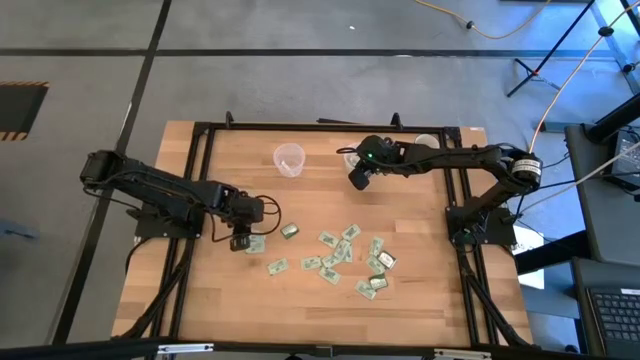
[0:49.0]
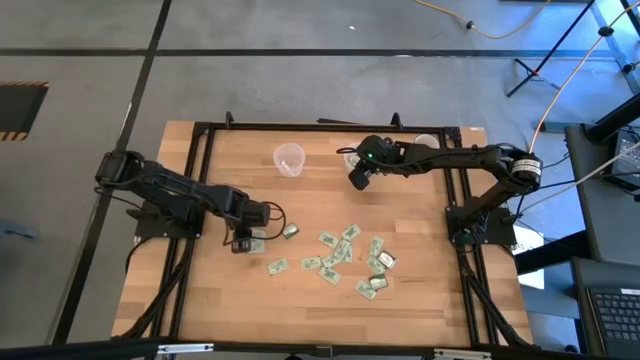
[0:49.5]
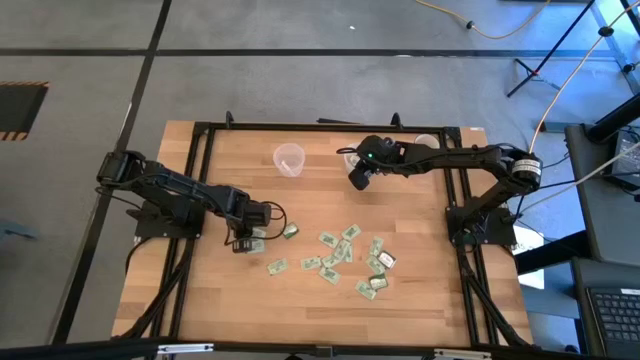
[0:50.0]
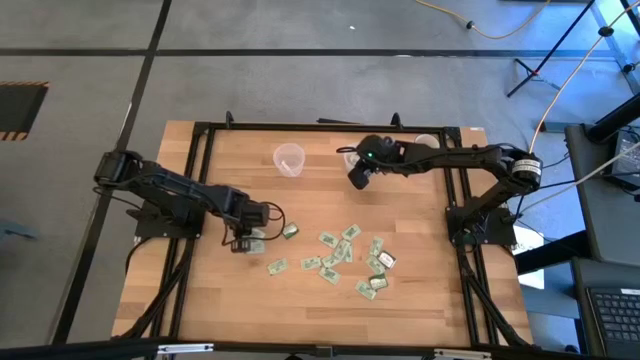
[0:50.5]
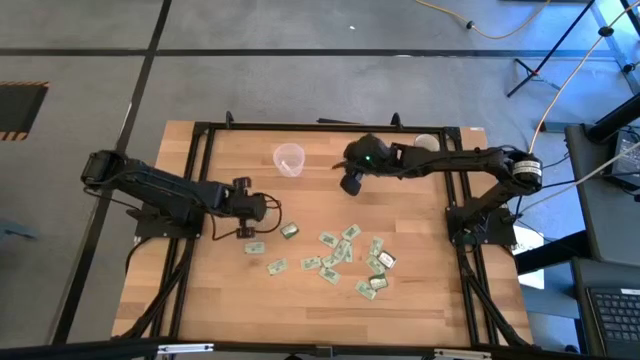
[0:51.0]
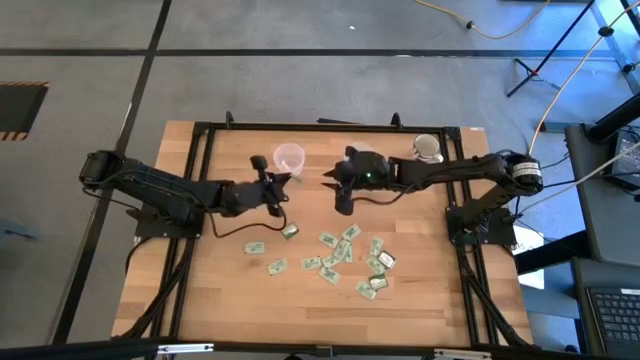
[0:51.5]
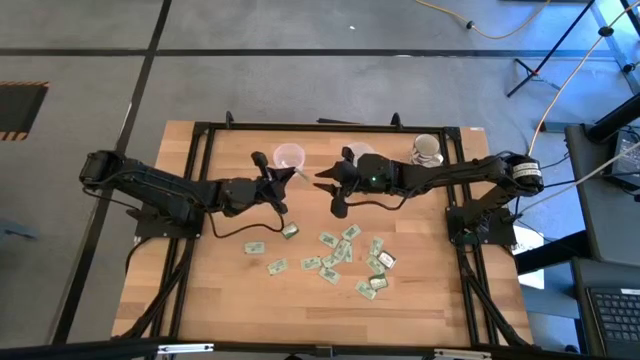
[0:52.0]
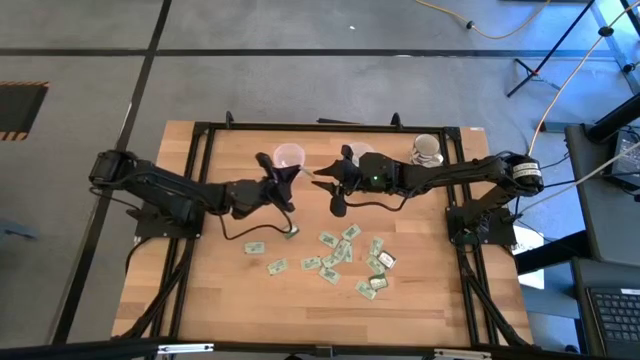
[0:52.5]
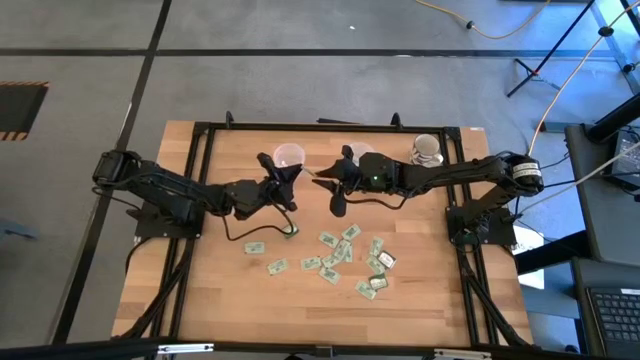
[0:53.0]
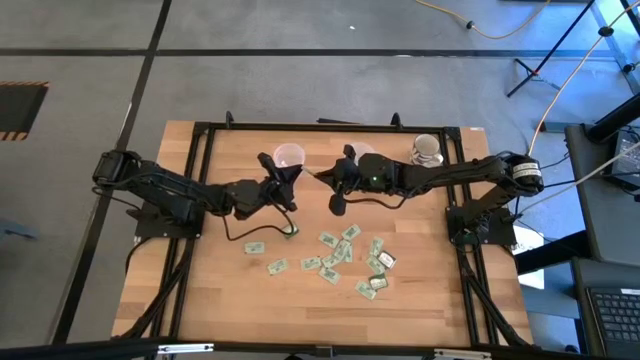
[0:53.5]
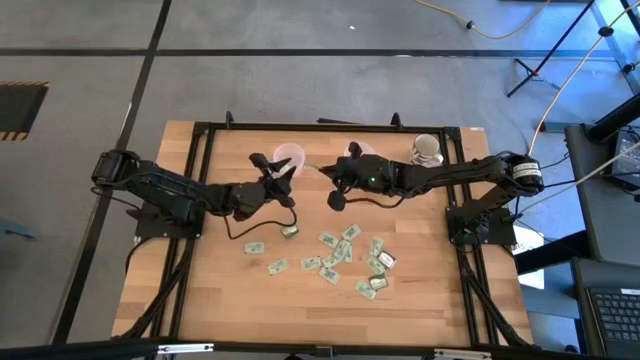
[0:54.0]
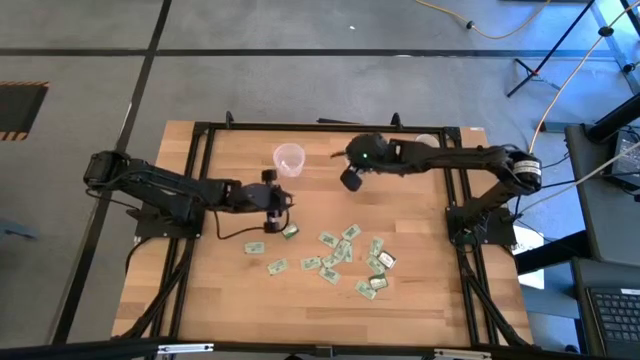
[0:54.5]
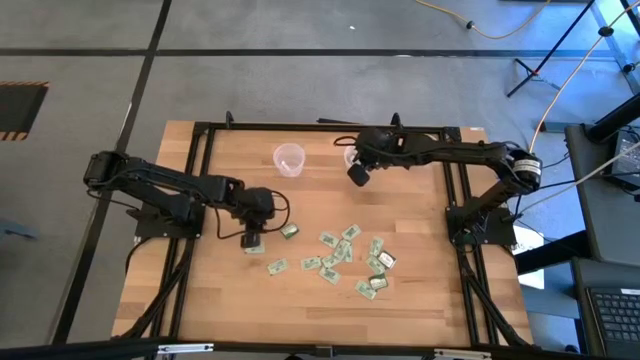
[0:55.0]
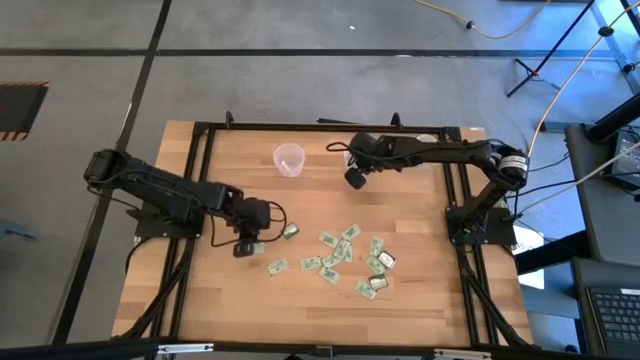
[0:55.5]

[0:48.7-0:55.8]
Task: Pick and place Stevia / Truvia into bins
Put the stevia packet into the right transparent container

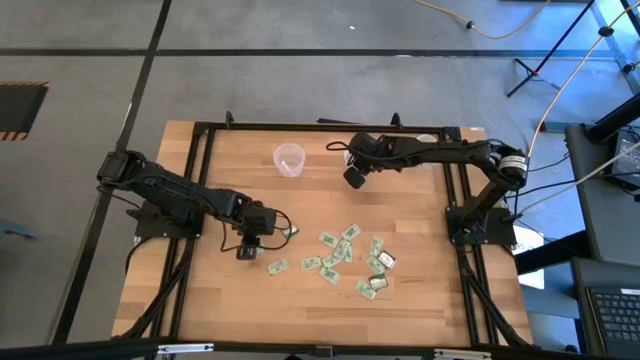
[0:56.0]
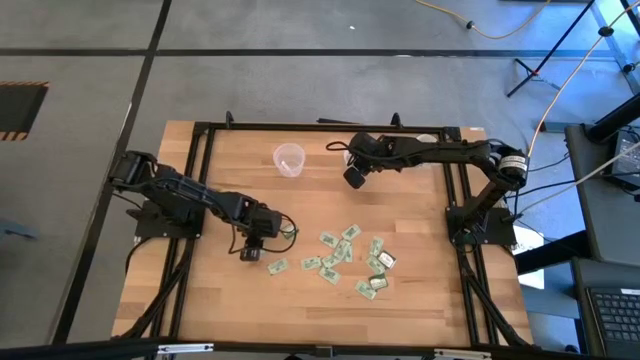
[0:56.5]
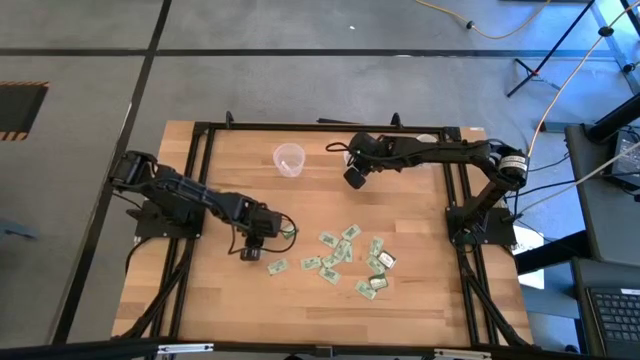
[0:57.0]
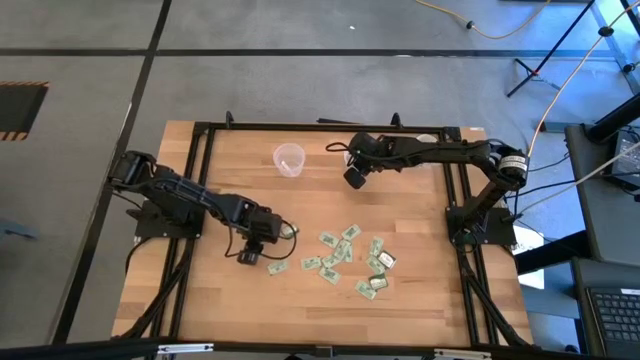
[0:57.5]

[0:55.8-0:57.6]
Put the stevia packet into the right transparent container

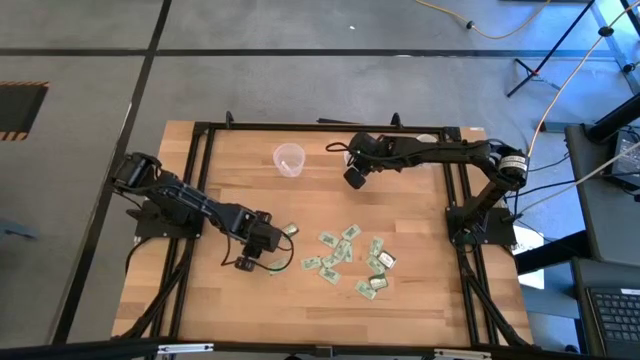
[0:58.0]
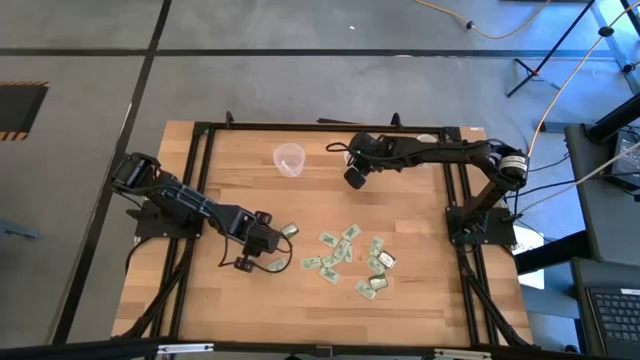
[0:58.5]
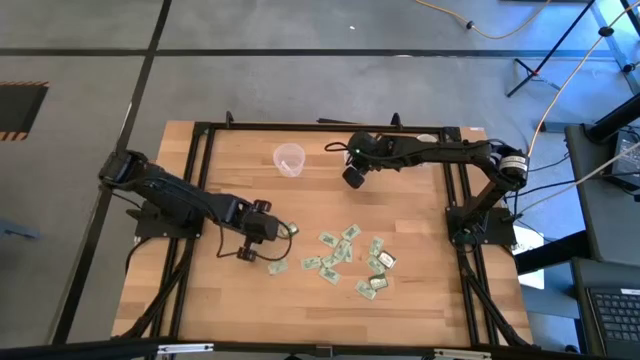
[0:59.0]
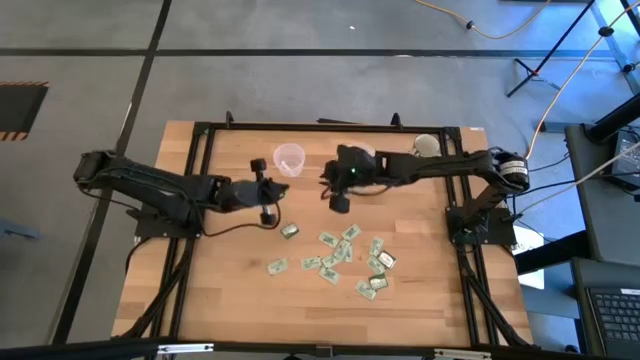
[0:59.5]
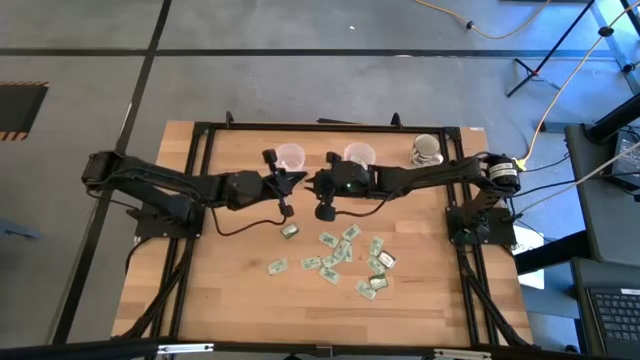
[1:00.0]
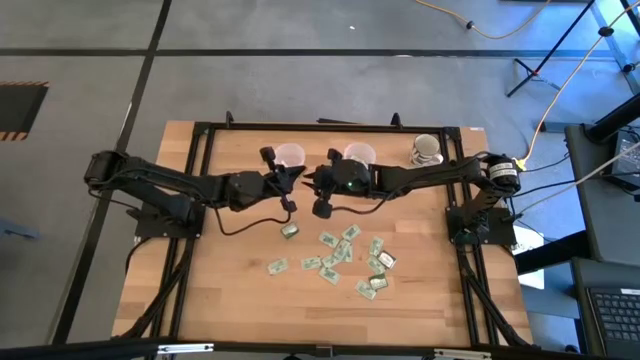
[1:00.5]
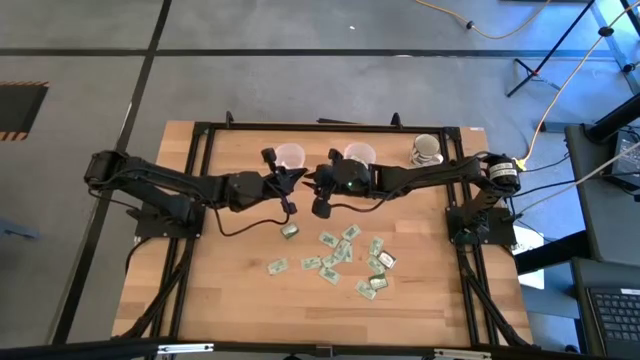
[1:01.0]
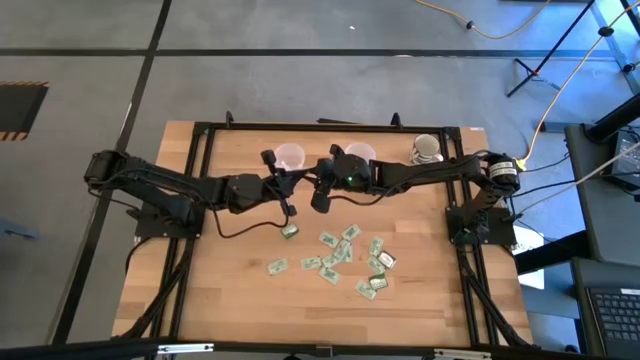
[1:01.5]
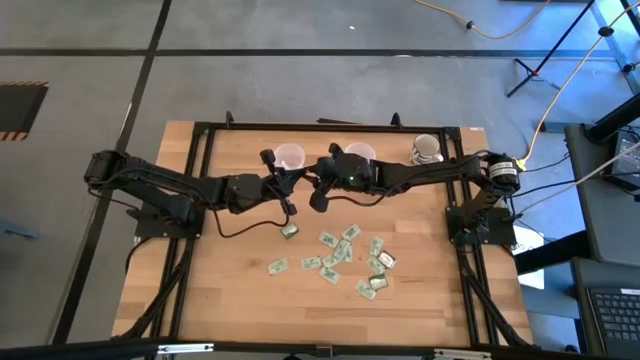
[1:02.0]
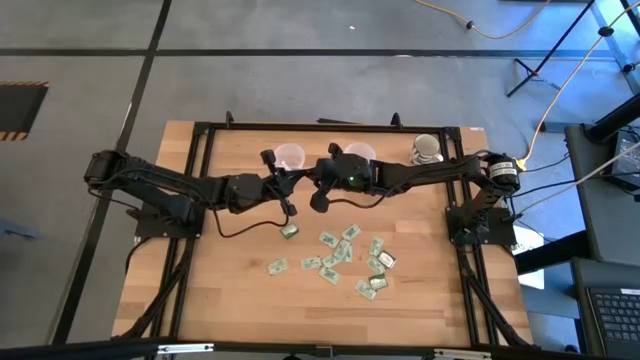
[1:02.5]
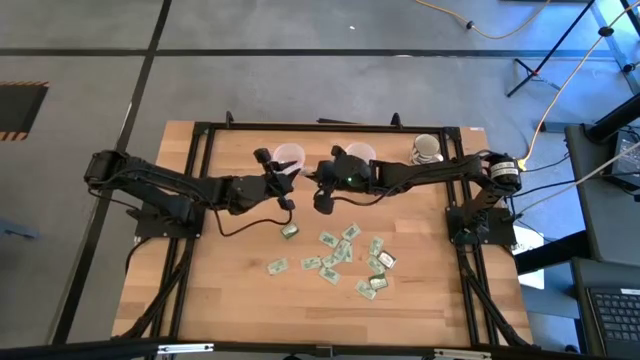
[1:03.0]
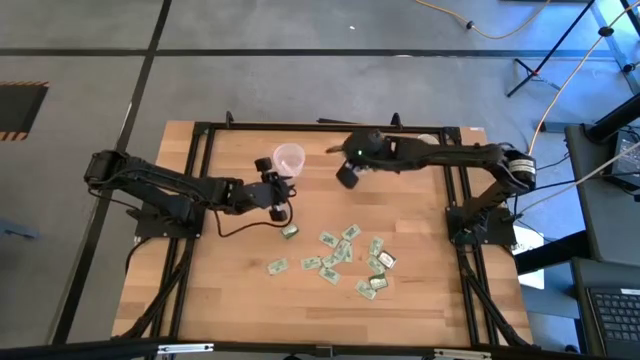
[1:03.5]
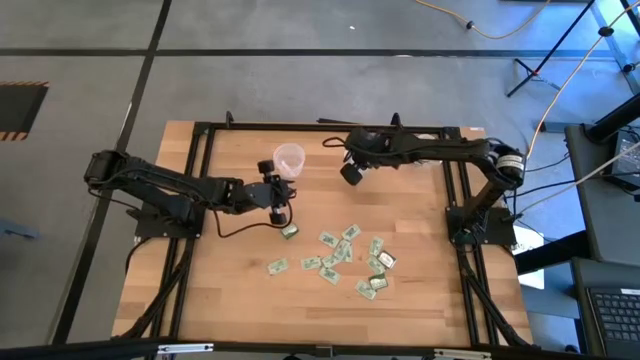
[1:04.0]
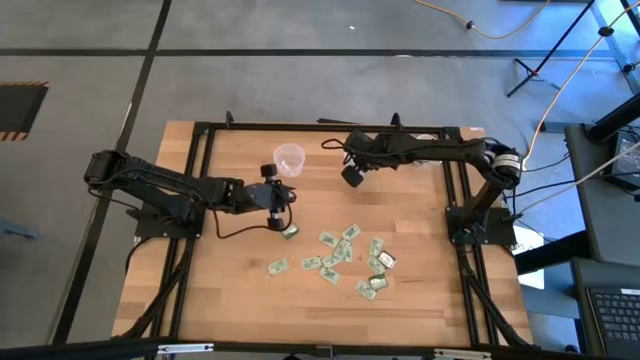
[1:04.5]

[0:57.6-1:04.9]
Put the stevia packet into the right transparent container

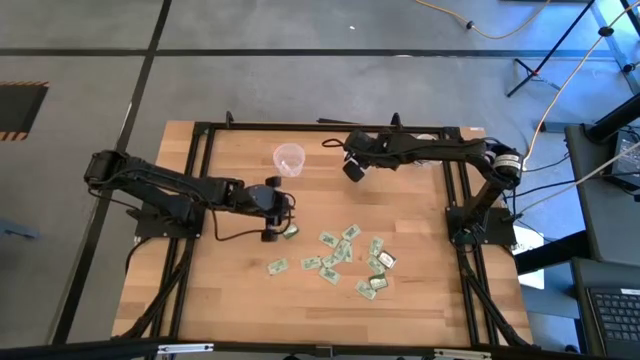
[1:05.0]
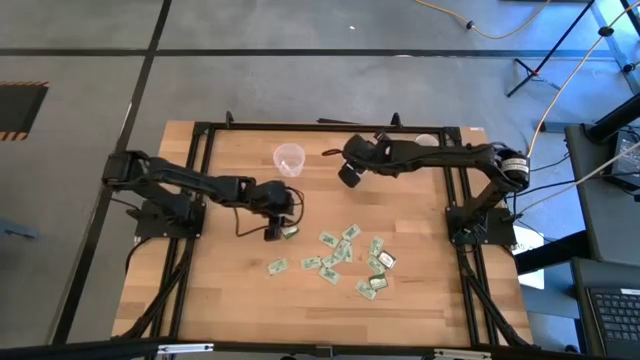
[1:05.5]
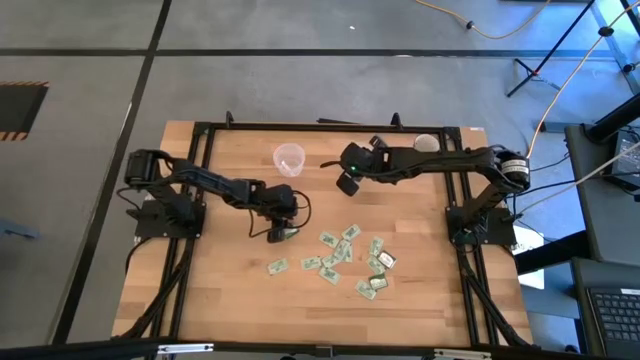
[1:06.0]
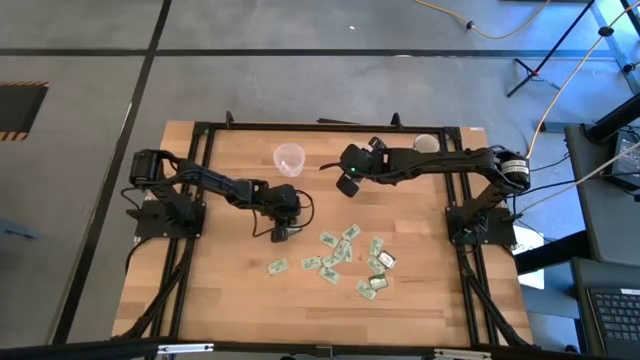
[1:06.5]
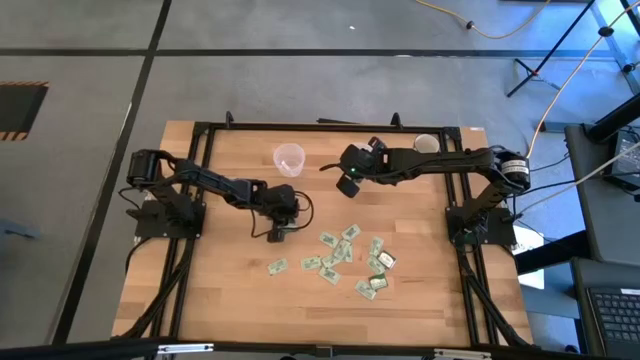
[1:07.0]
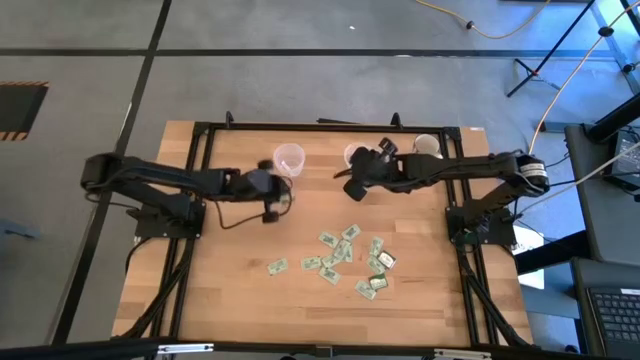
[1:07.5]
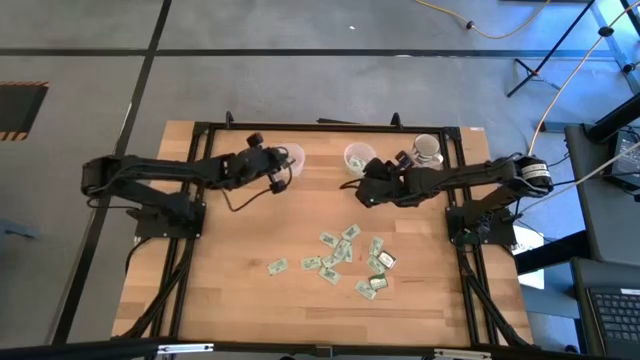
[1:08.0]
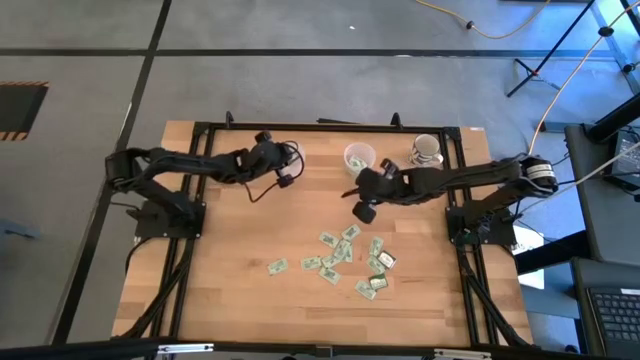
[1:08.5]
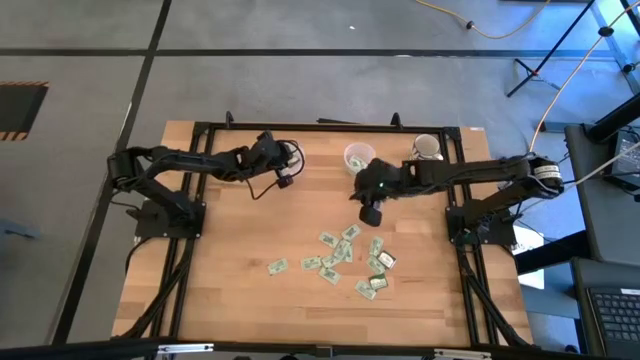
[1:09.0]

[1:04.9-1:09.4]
Put the truvia packet into the left transparent container

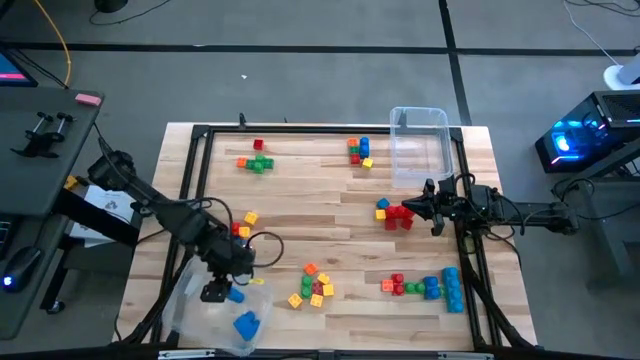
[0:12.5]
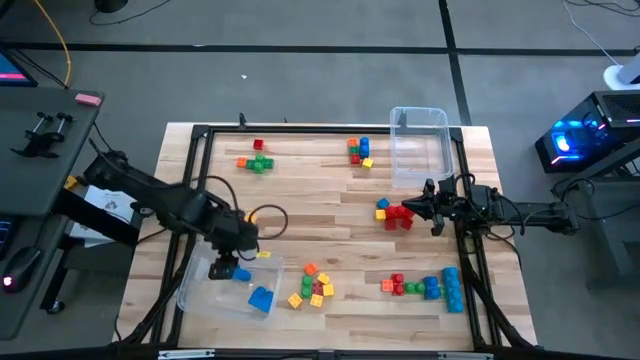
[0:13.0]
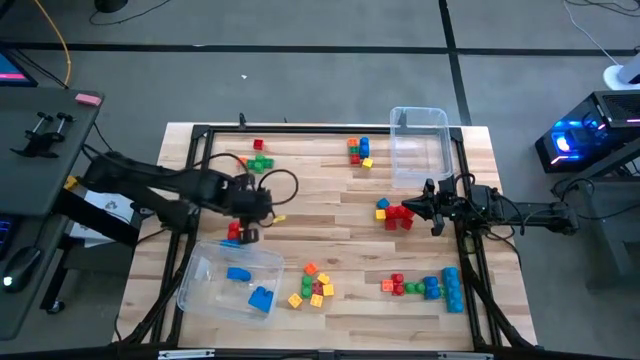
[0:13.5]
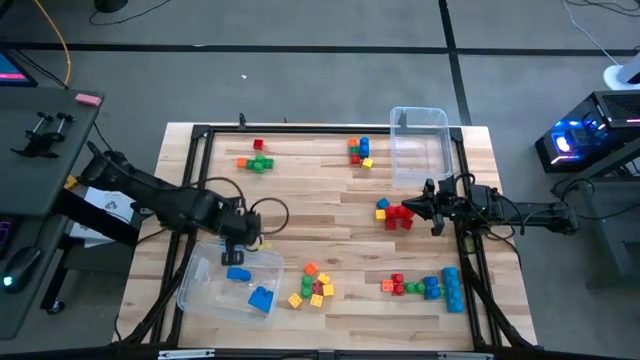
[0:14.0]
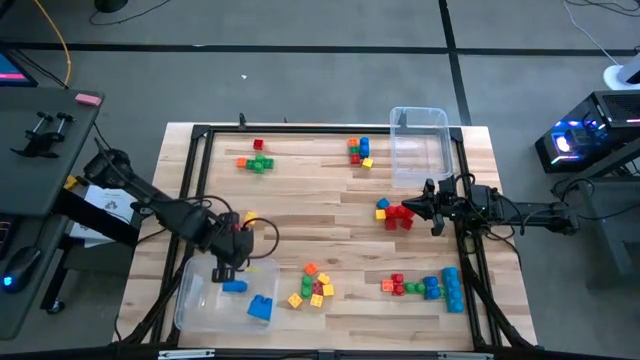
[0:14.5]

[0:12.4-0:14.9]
Task: Sort blocks by size
Adjust the left transparent bin
